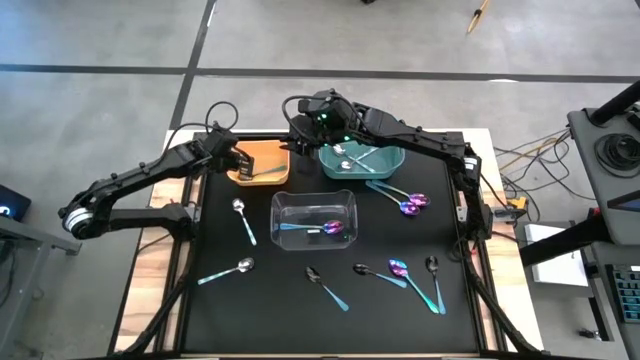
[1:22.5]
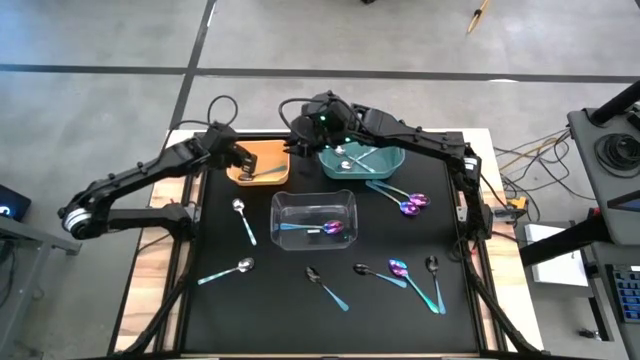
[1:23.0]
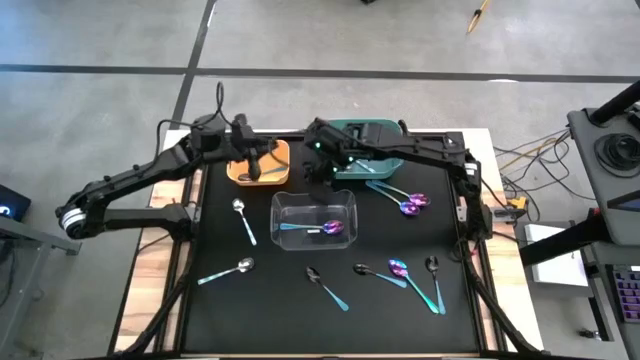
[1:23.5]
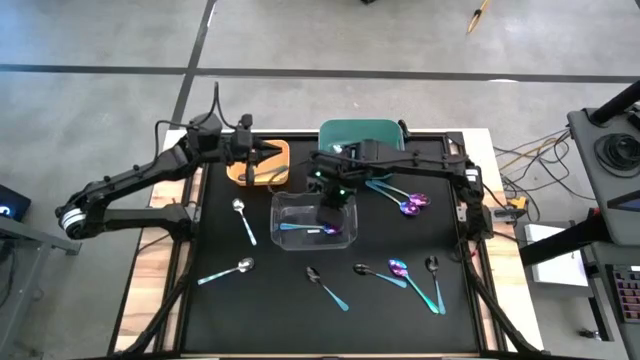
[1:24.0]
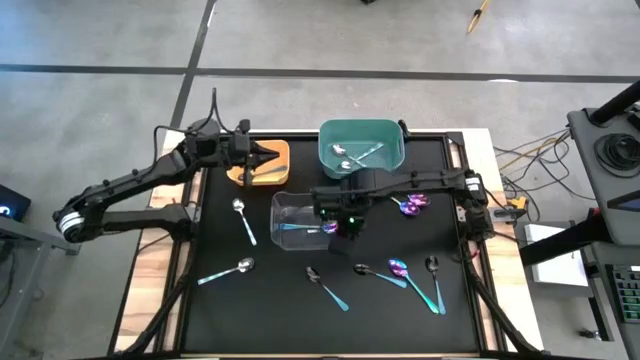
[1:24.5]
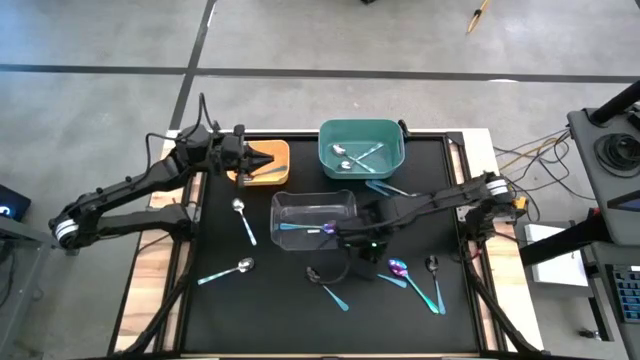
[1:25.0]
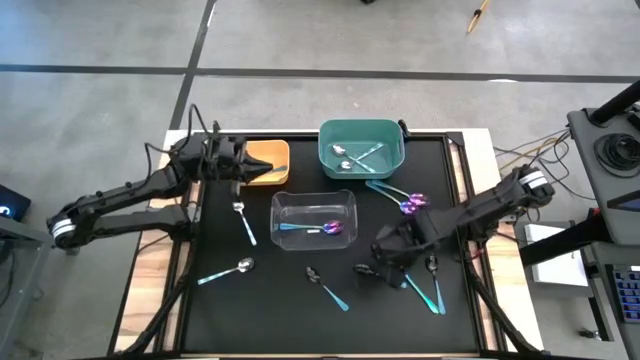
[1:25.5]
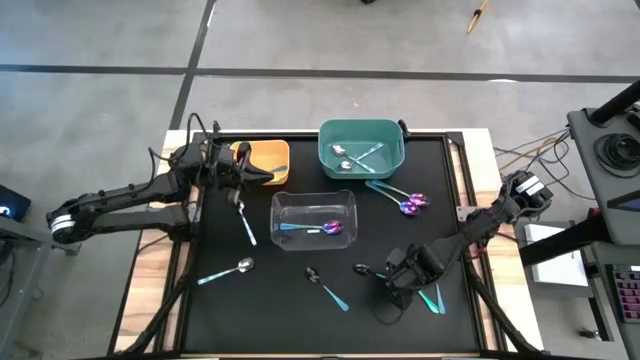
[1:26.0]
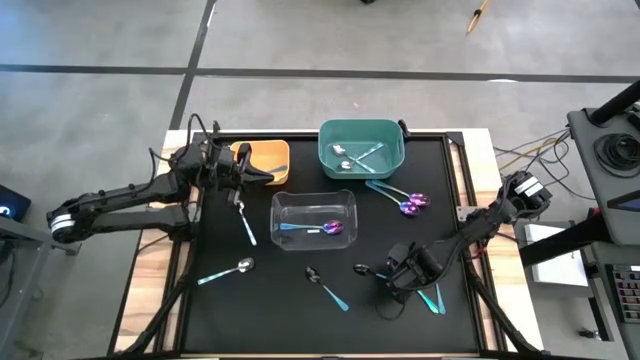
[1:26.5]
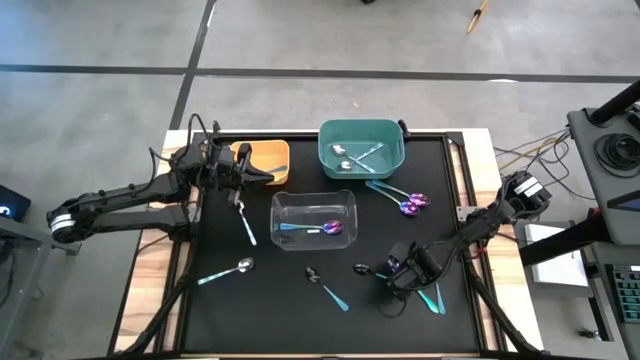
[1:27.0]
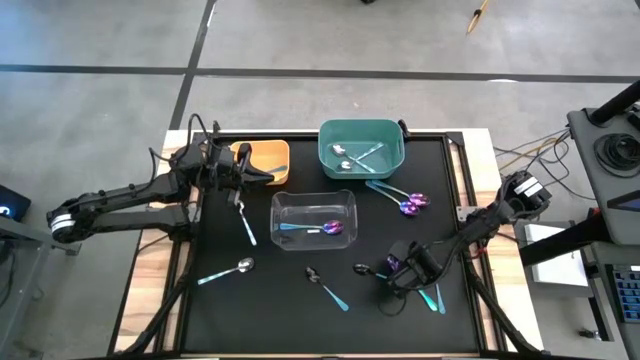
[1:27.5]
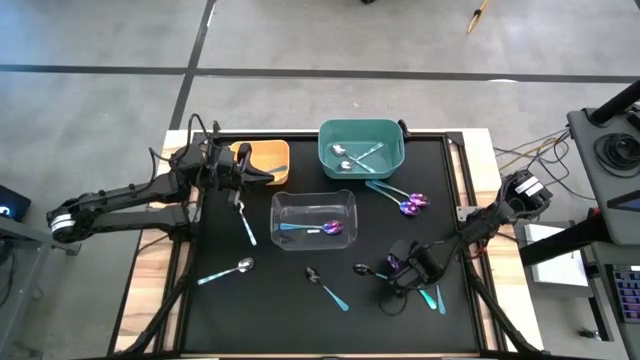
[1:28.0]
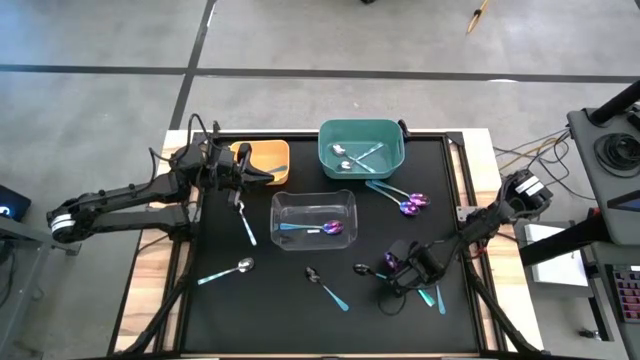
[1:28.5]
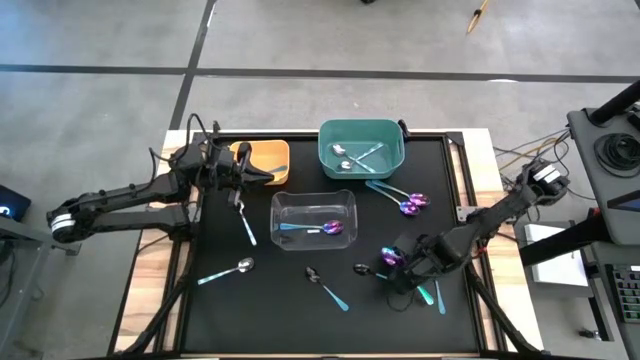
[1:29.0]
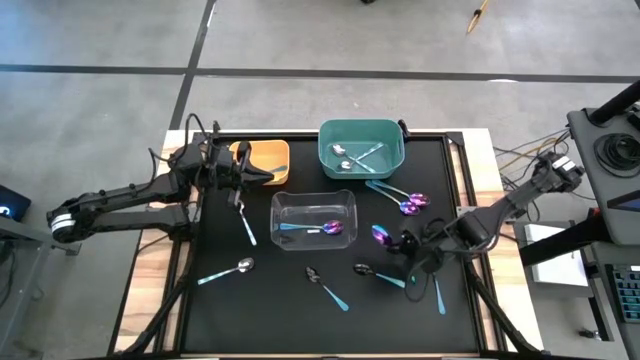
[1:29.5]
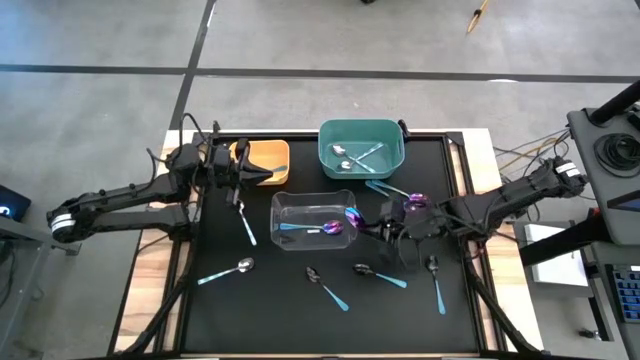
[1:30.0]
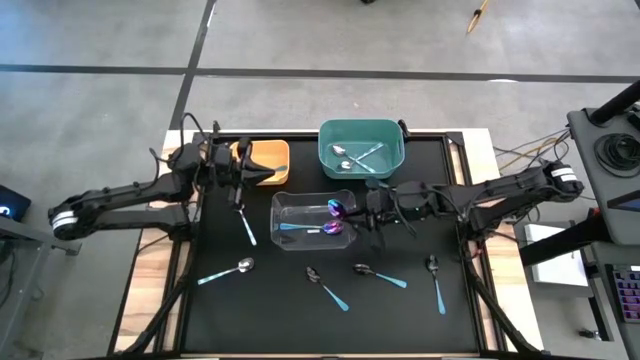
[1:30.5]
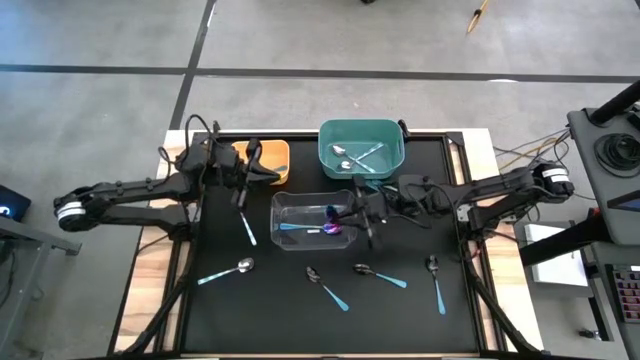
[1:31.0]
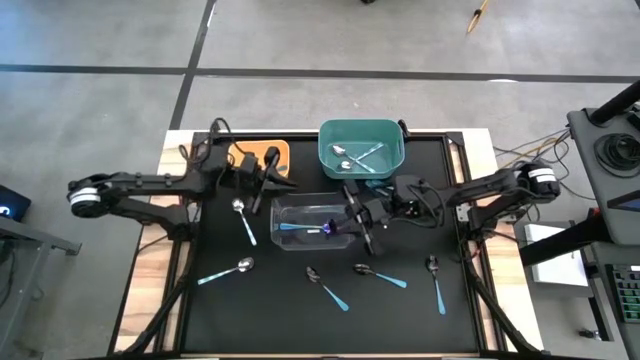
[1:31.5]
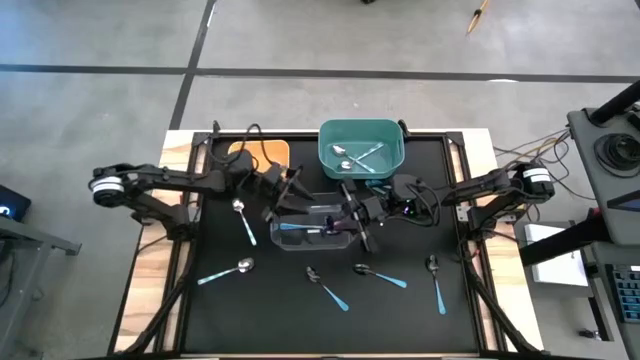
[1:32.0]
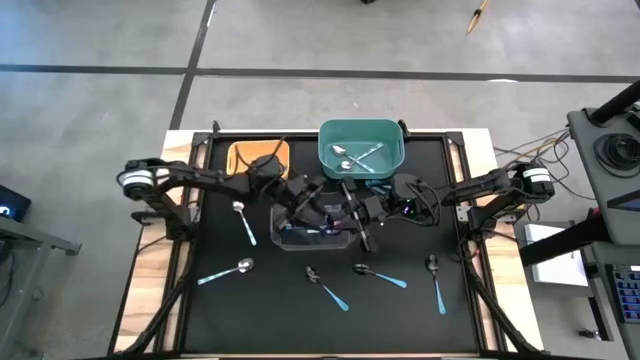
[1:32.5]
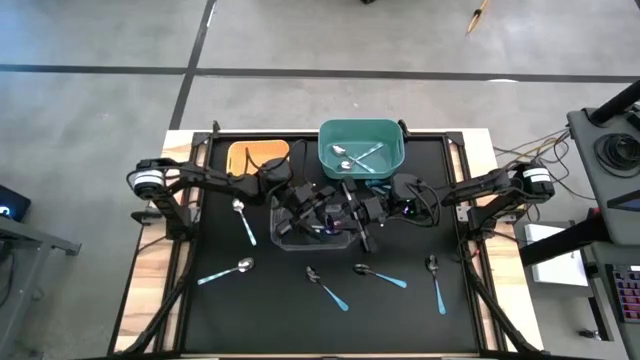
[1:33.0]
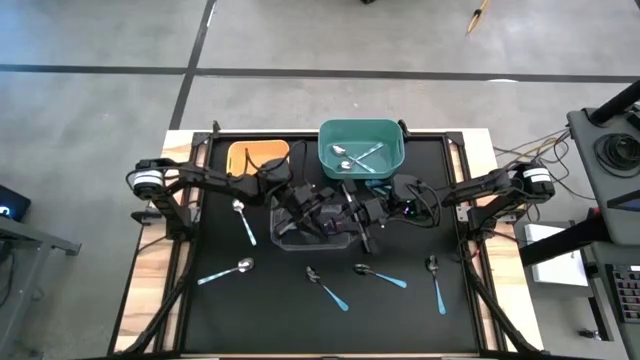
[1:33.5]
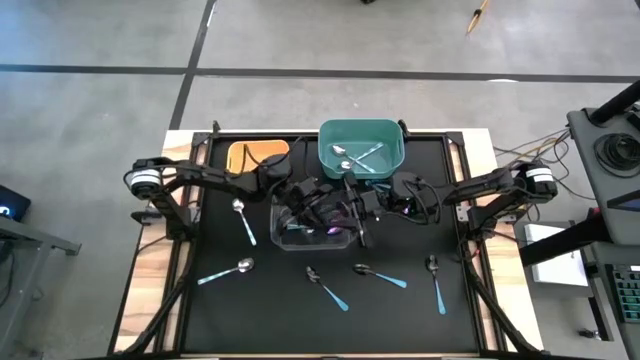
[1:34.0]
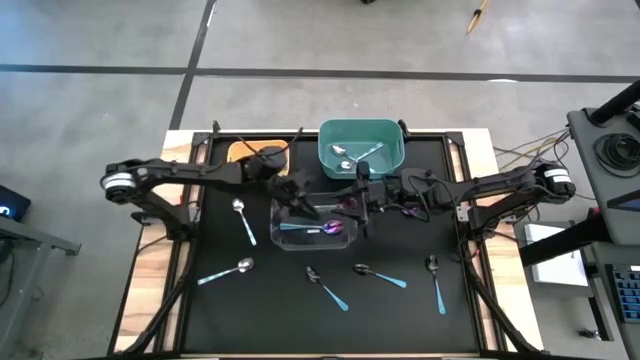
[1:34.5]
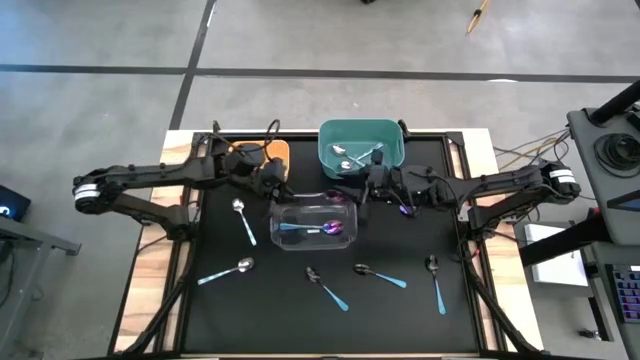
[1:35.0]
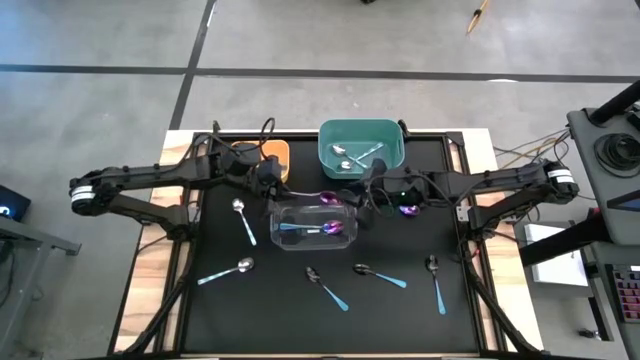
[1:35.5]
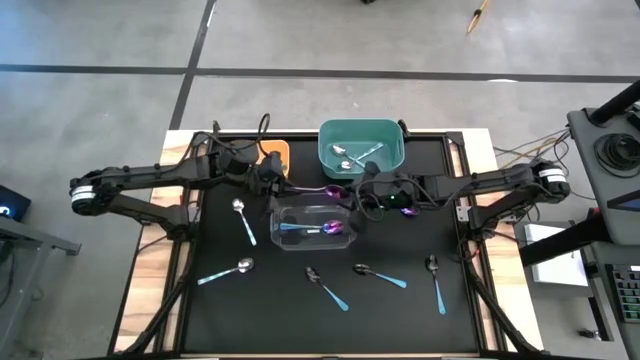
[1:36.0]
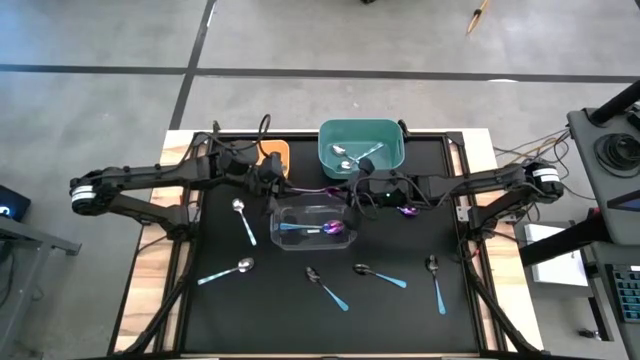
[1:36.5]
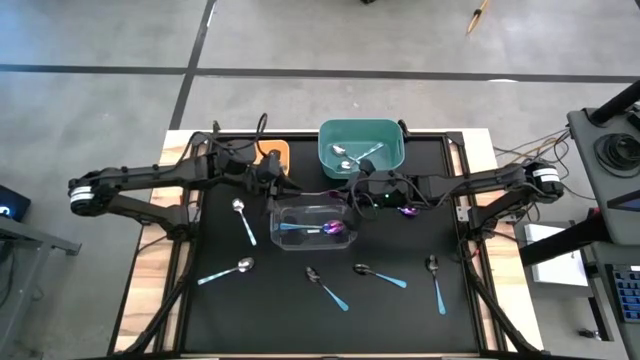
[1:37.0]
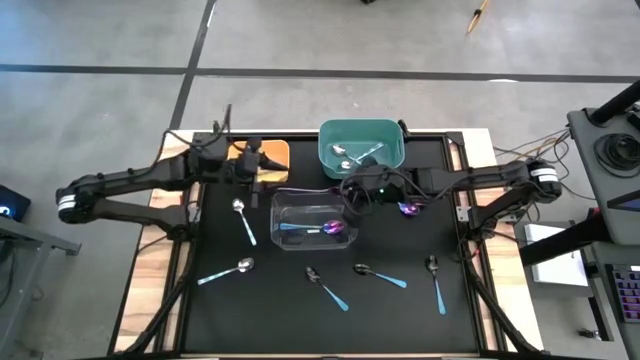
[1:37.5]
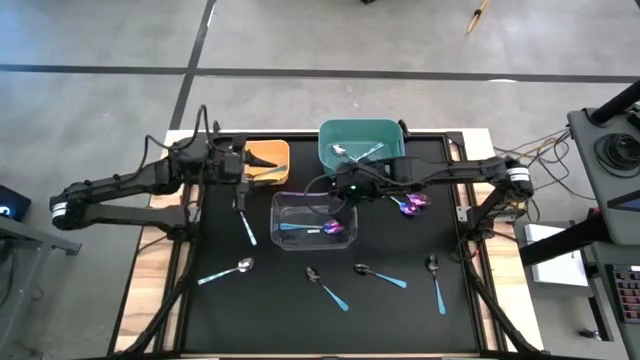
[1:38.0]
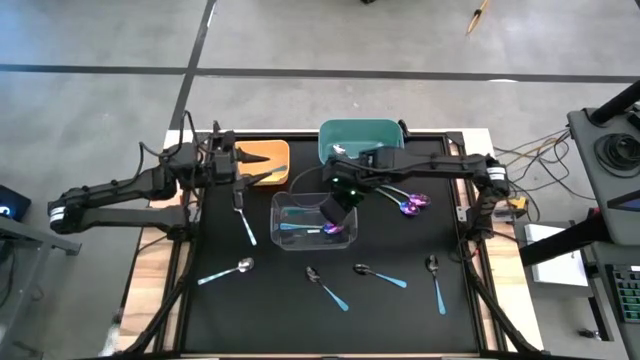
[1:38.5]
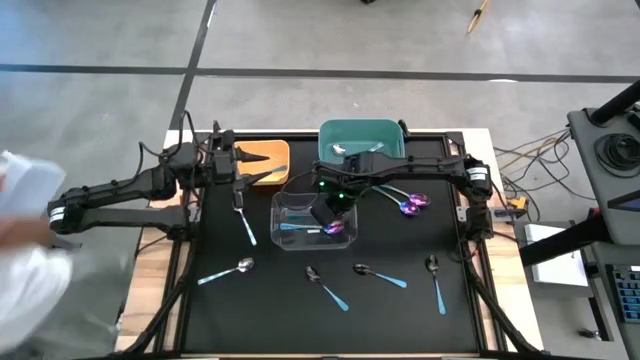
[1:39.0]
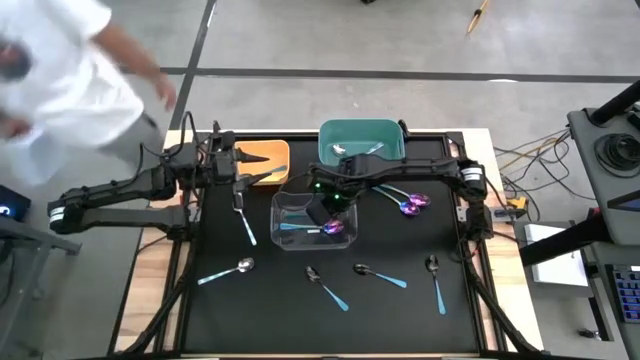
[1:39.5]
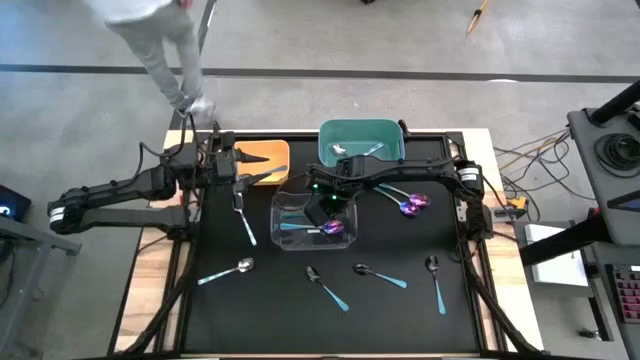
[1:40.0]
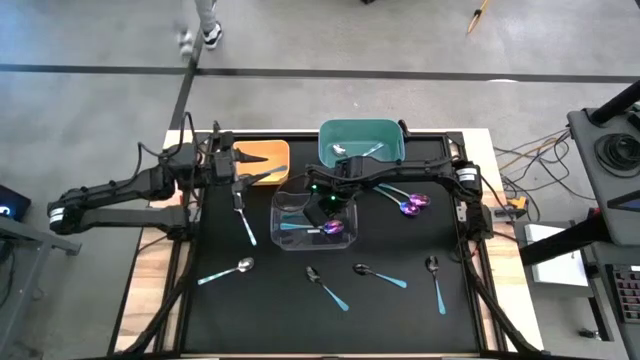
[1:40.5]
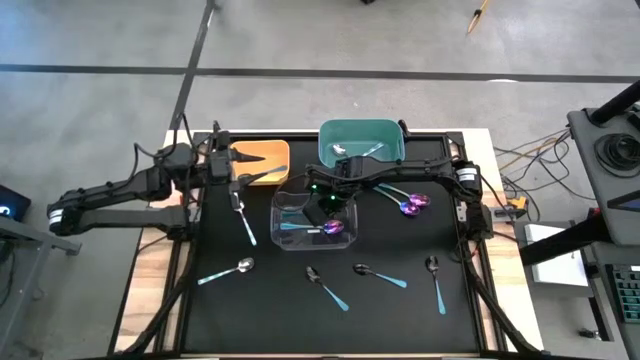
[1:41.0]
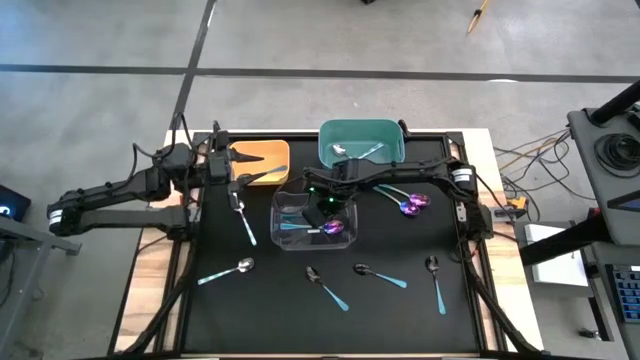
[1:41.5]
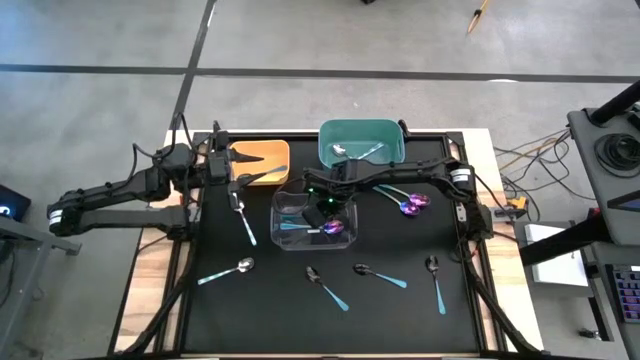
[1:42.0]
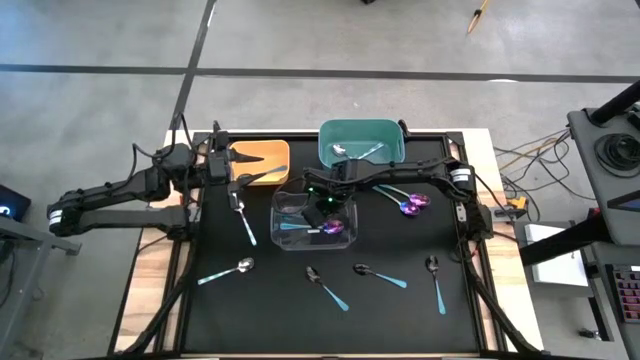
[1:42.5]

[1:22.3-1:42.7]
Task: Sort silverware by color (type)
Put the violet spoon into the transparent bin

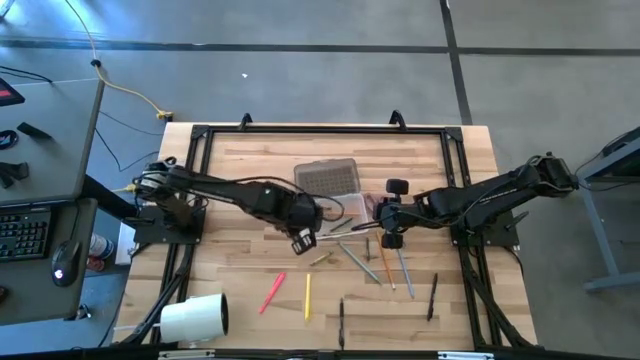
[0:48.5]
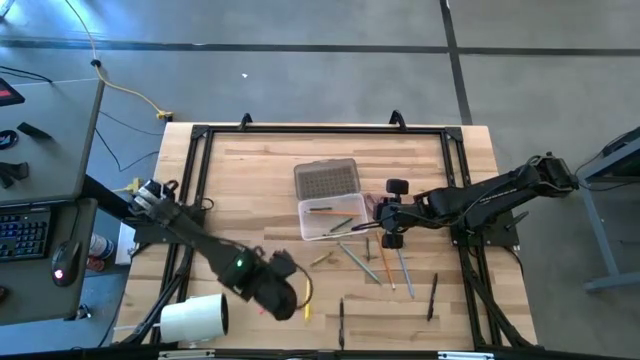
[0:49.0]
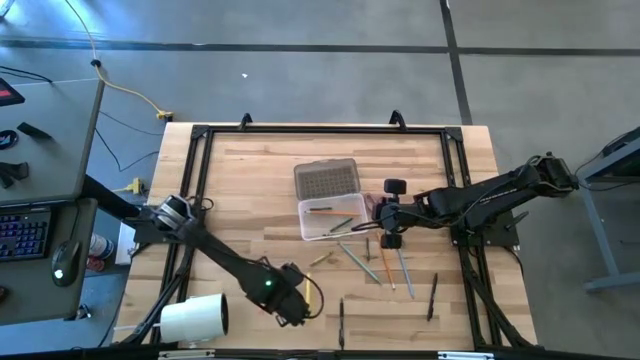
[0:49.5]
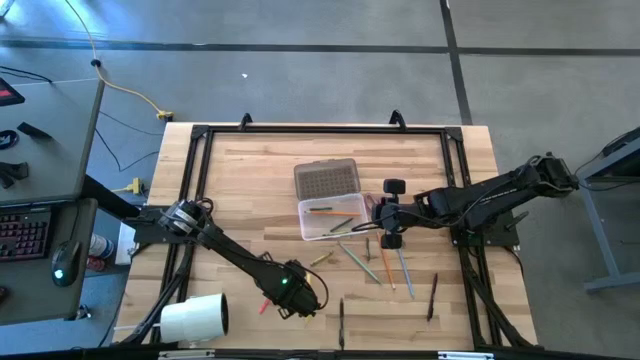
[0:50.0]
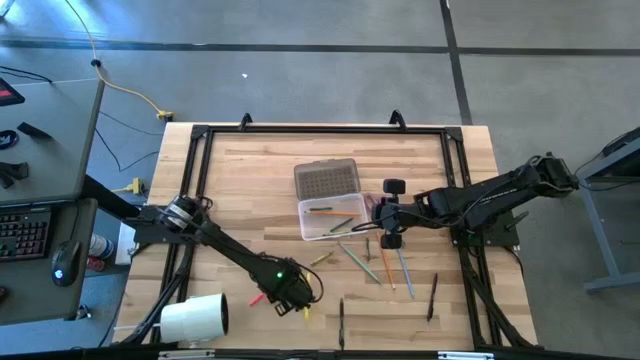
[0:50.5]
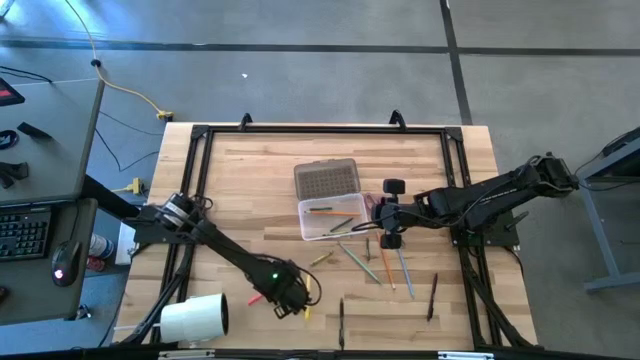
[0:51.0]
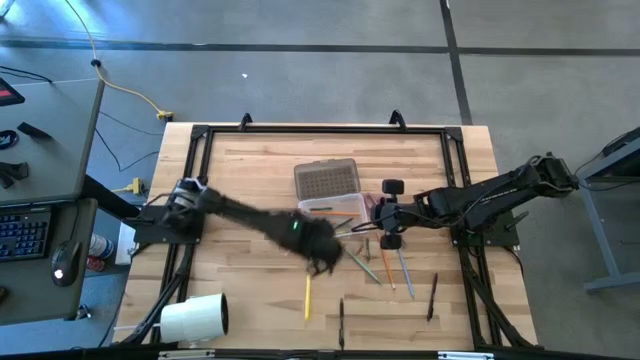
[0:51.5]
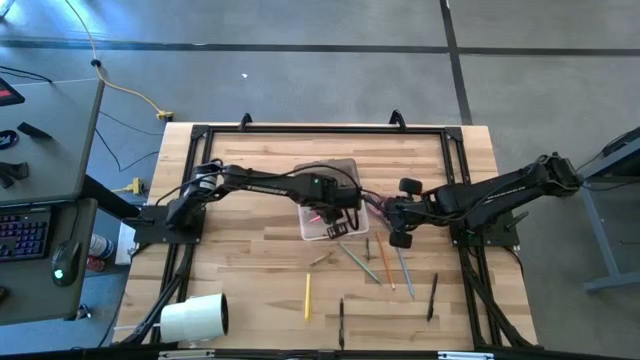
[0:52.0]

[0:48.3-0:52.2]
Task: Pick & place school supplies into a supply box
Put the pink pen into the black supply box
